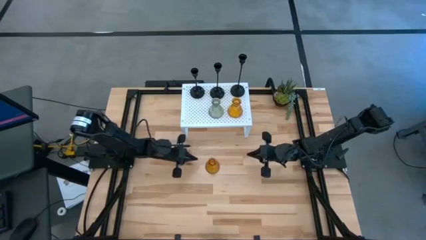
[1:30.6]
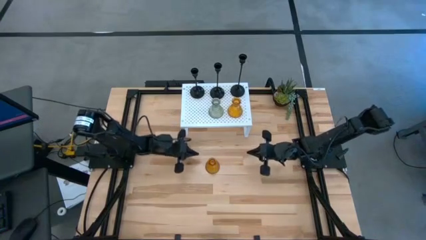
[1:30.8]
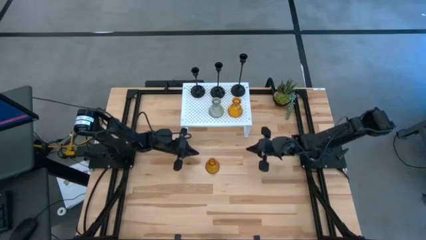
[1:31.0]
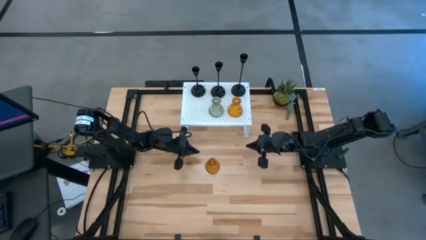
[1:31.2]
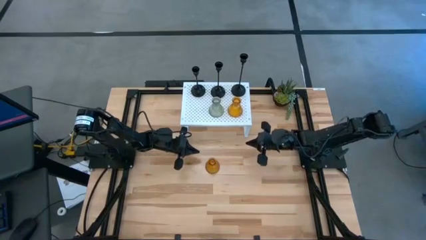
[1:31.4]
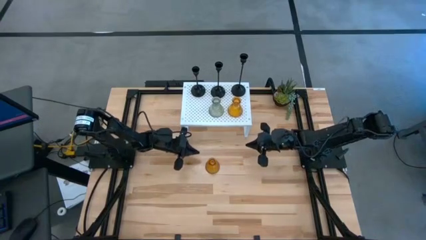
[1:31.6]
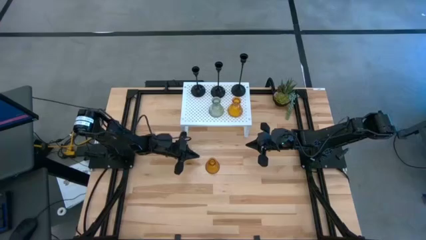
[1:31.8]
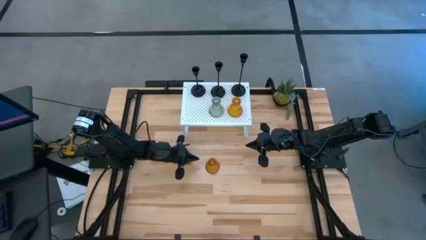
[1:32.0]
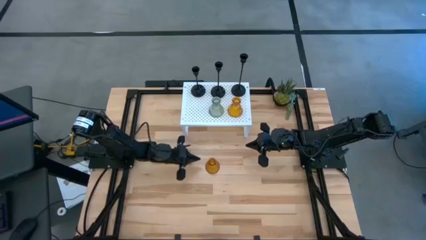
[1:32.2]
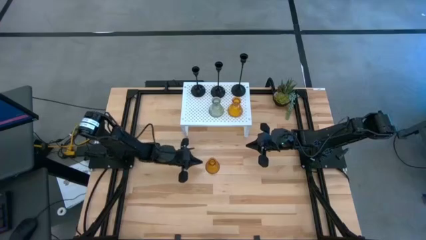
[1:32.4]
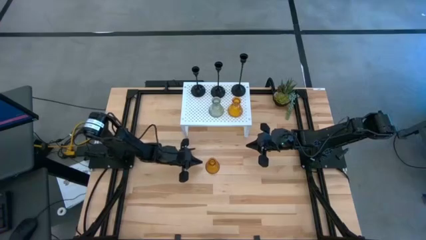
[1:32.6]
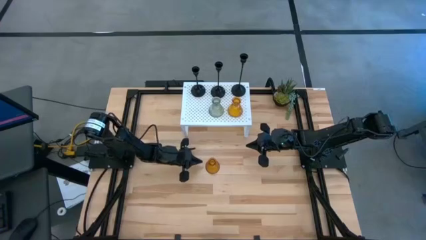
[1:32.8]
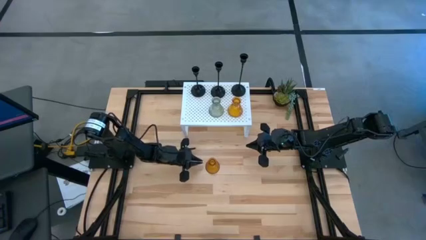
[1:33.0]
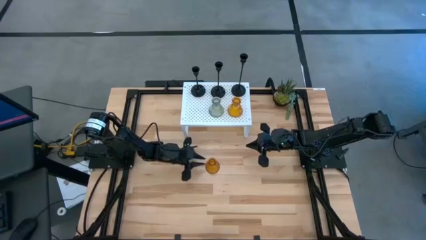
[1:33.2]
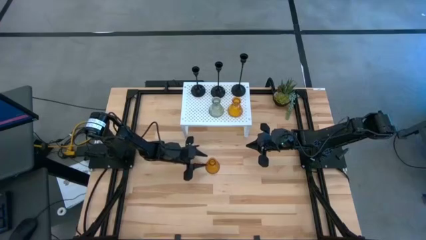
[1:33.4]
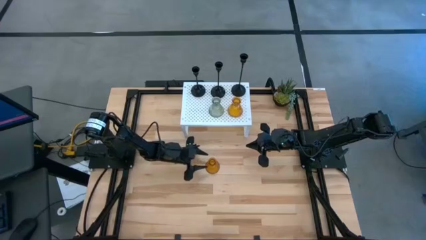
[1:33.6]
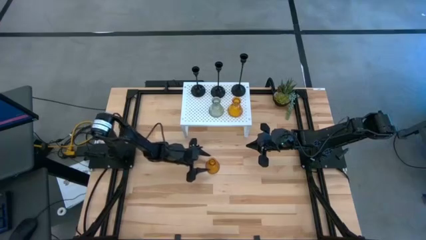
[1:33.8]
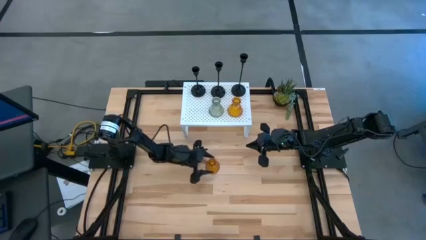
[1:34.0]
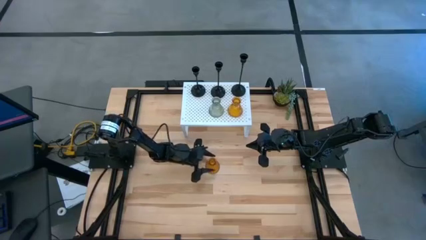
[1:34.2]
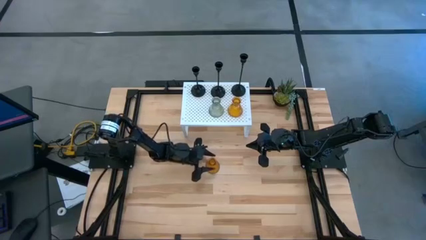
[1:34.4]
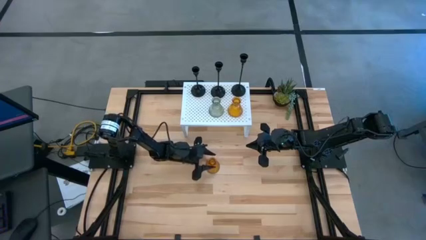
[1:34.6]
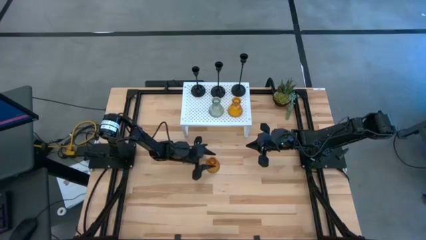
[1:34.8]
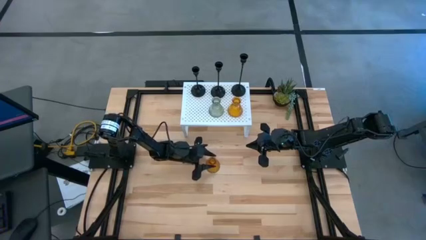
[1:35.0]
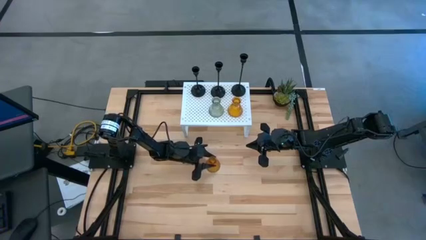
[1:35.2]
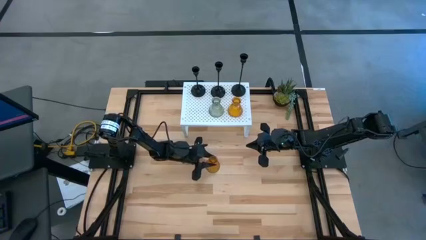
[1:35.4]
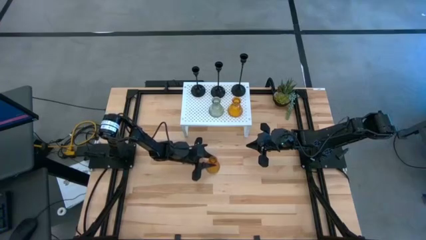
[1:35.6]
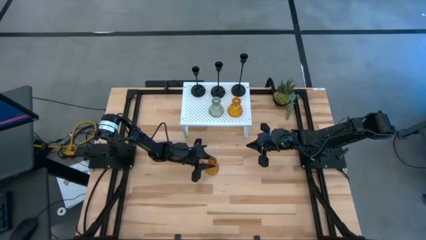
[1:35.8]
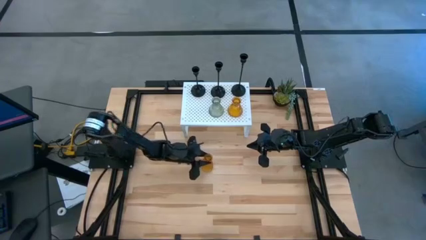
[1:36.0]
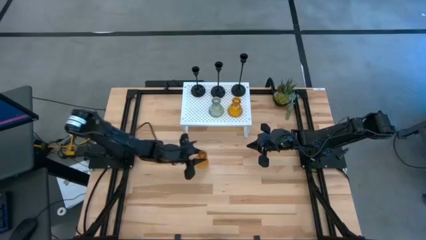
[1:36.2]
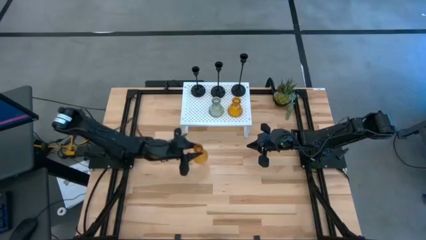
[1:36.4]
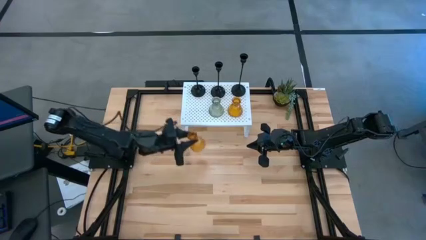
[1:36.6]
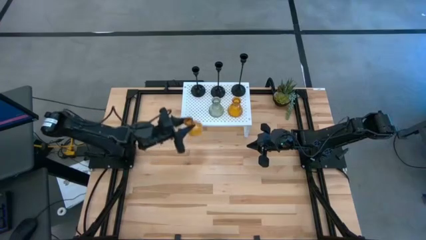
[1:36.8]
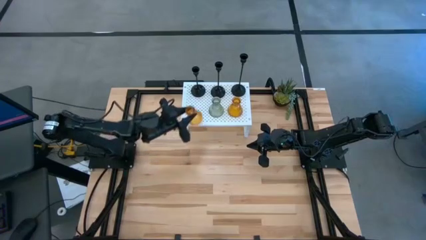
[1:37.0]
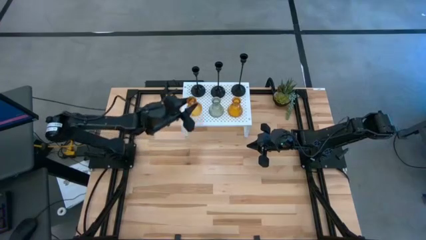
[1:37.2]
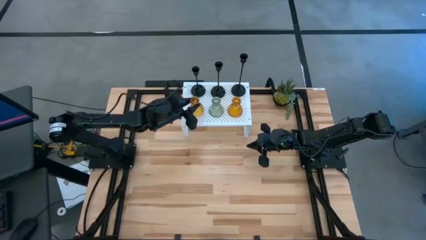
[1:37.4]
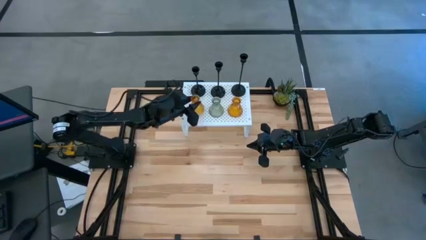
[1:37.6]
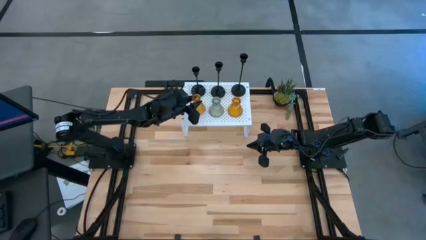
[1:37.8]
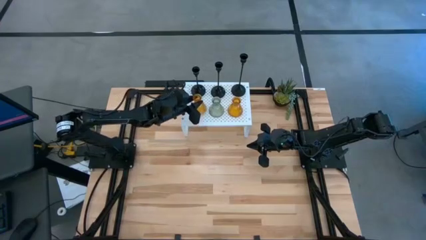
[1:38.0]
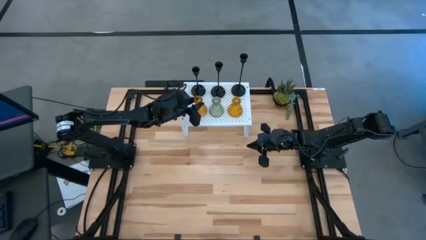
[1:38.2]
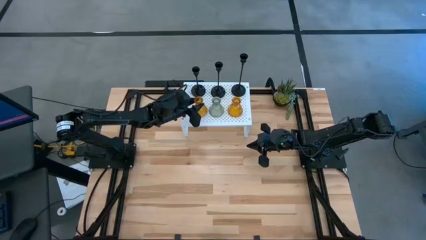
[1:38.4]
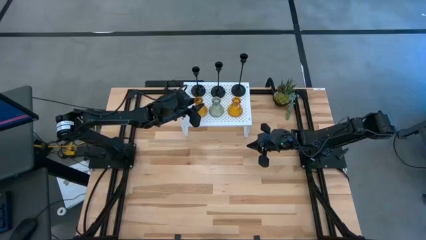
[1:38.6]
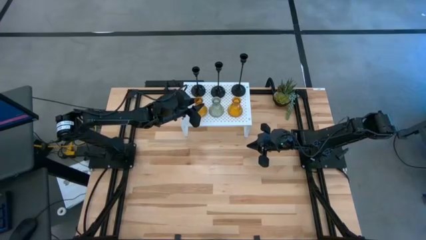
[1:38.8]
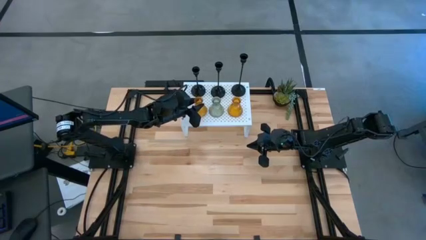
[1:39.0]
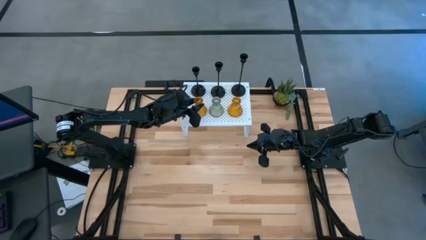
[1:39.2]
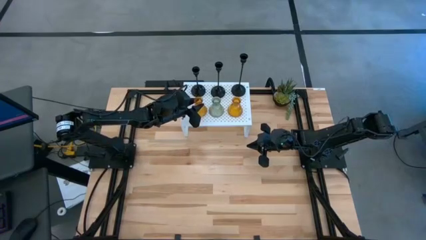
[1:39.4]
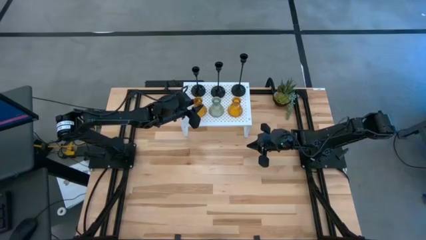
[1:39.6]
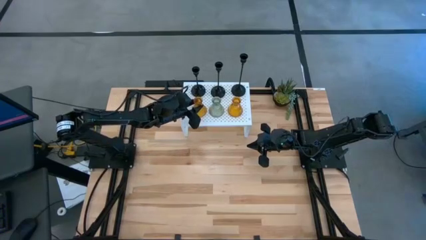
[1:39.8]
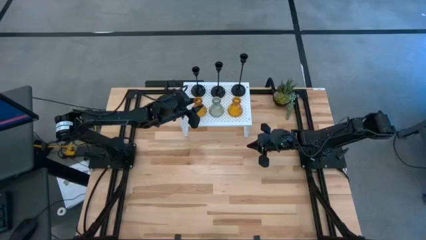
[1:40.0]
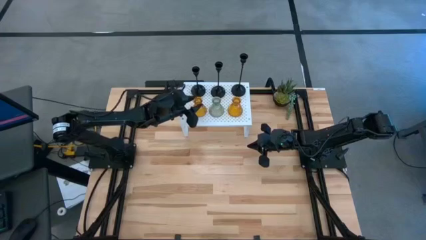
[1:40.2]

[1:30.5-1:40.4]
Task: Pick & Place candle stick holders
Put the orange candle holder on the white shelf

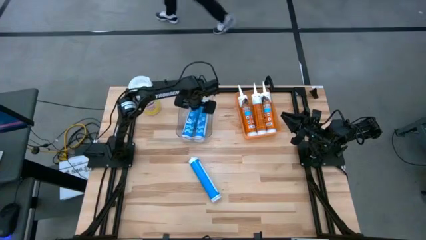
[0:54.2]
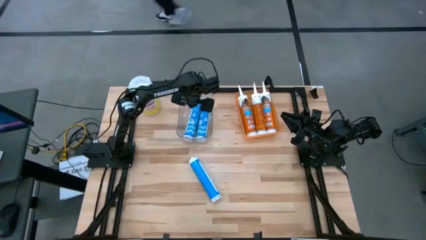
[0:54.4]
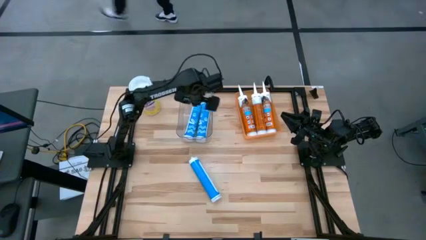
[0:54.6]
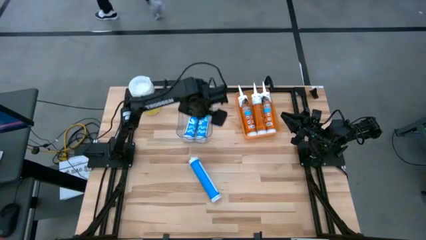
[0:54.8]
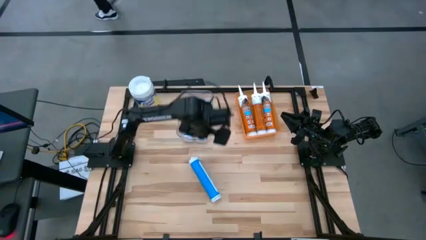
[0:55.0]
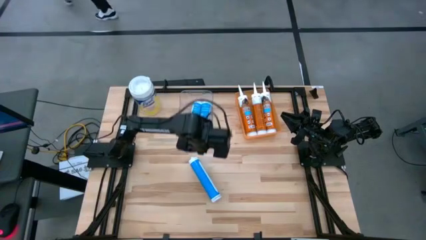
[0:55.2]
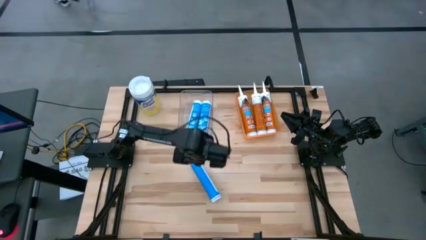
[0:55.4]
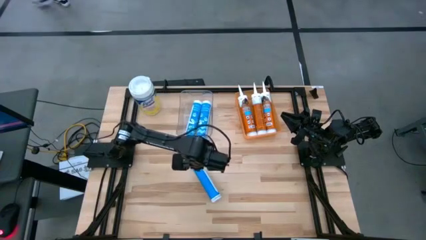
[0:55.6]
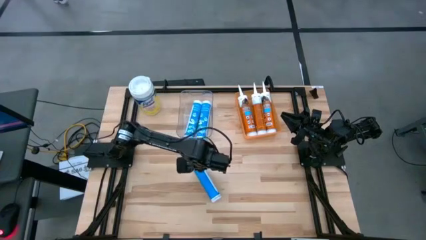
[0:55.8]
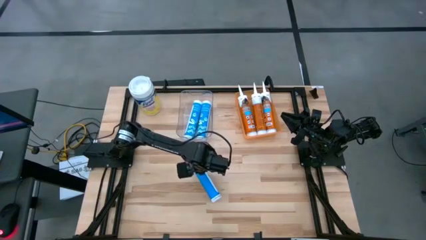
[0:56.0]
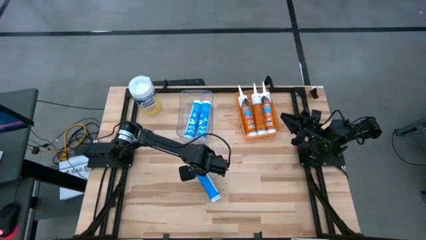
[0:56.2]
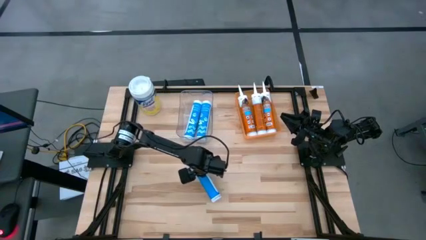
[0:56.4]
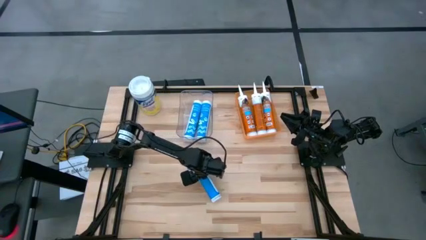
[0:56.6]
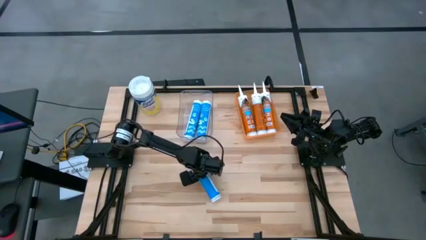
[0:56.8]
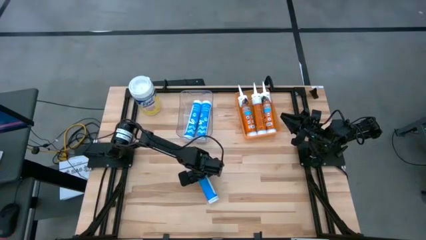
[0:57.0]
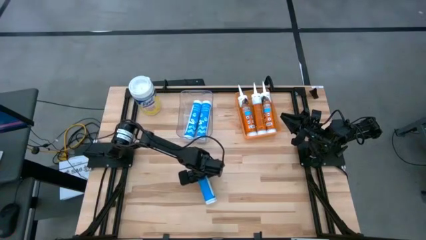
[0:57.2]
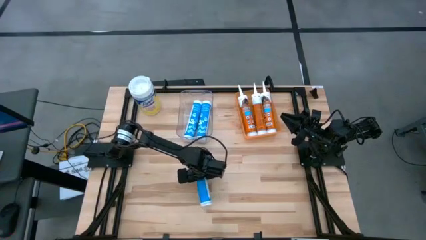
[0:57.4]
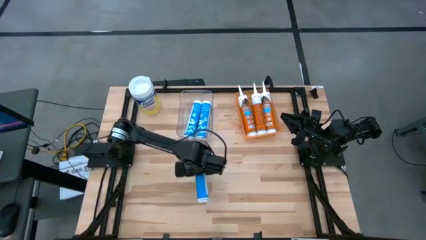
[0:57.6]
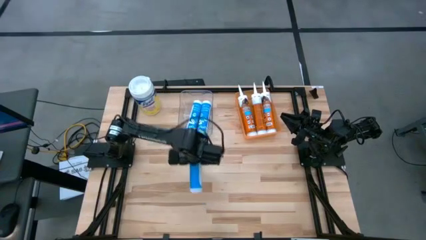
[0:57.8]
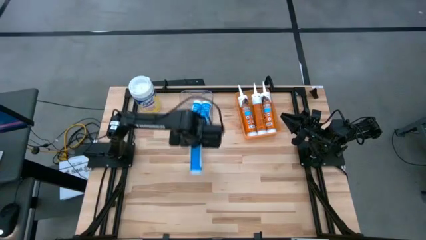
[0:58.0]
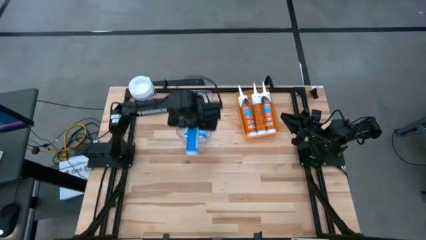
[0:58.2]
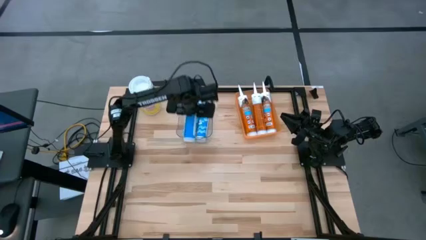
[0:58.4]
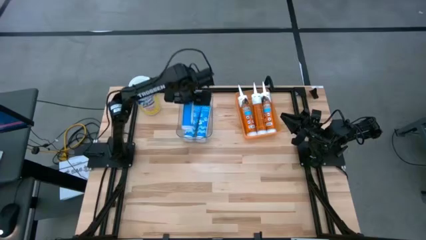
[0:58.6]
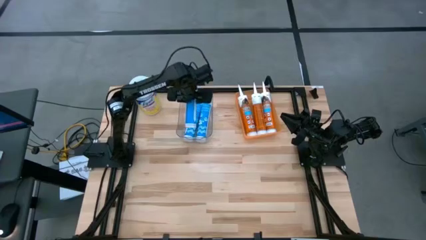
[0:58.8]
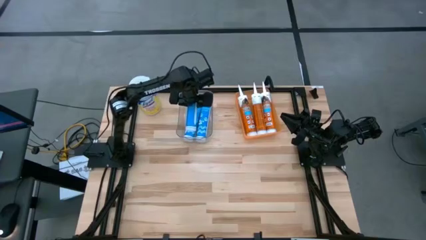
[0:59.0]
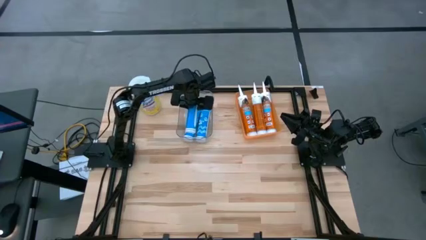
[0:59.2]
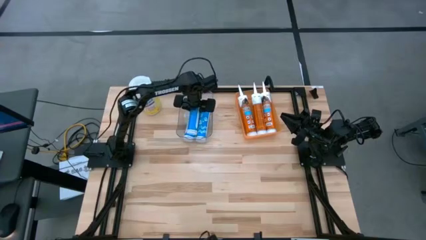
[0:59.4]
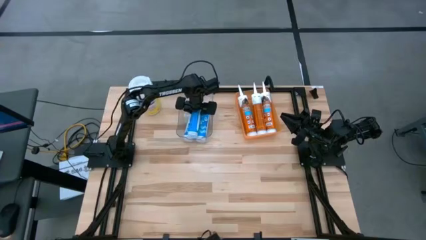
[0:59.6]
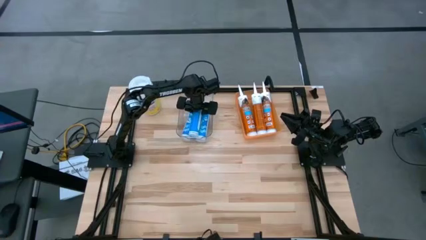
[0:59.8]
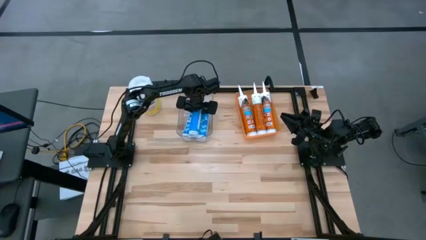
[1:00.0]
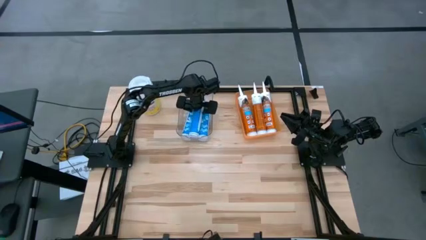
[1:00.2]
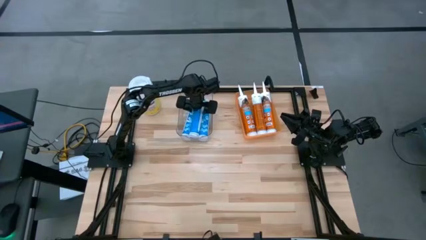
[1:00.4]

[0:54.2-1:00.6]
Task: Pick & place silicon tubes, Sealant and Lysol wipes
Put the blue sealant into the transparent bin
